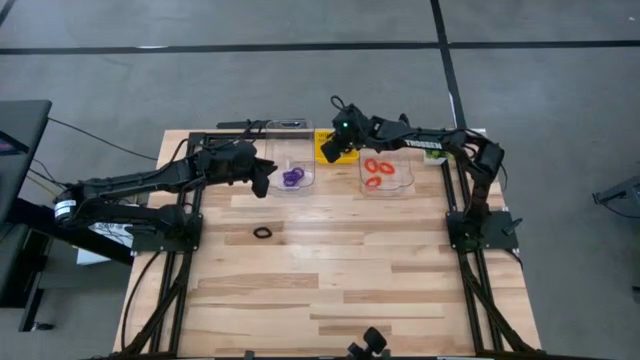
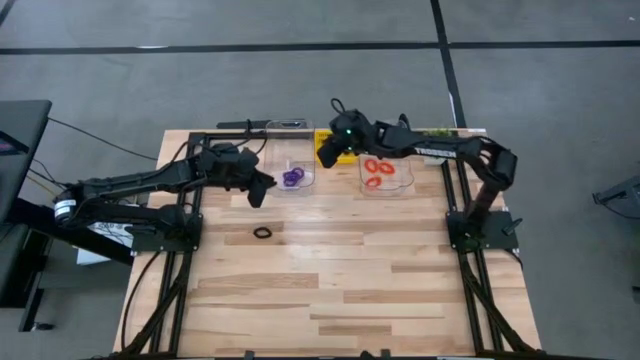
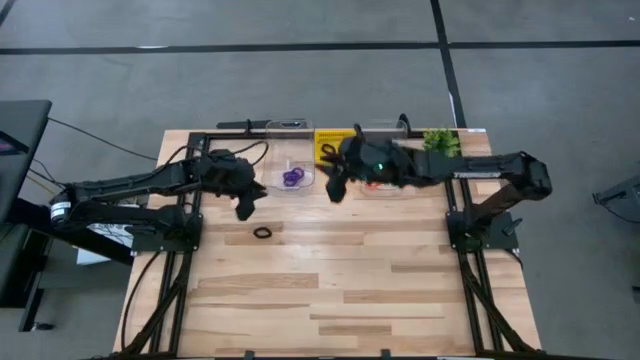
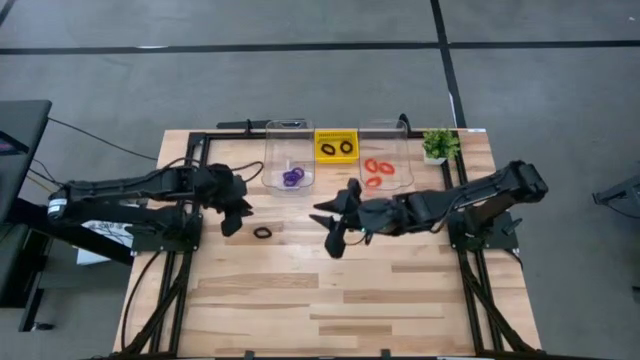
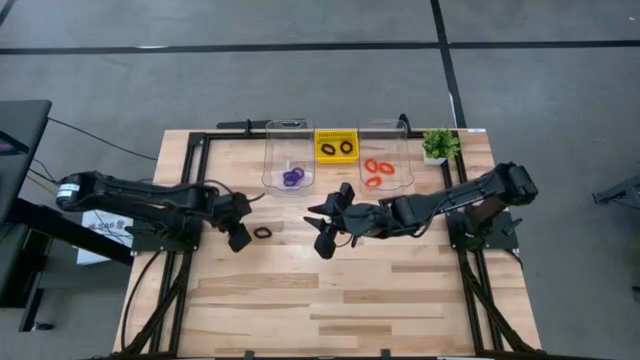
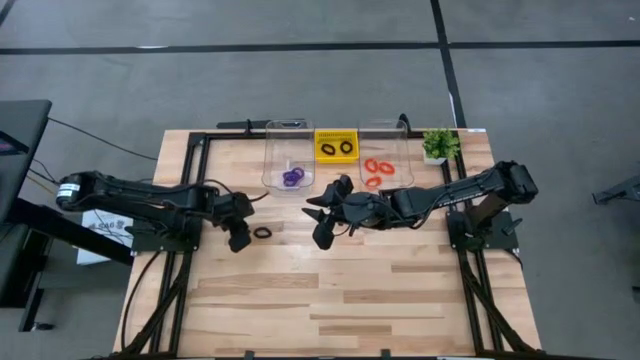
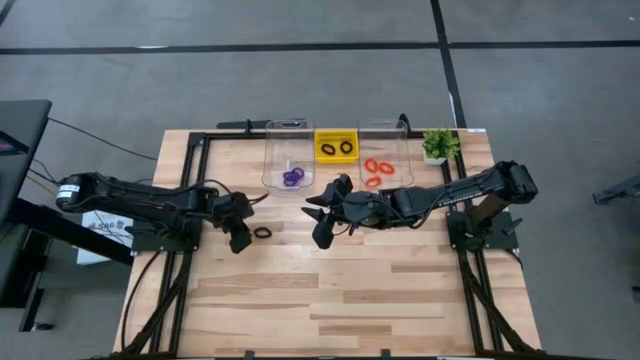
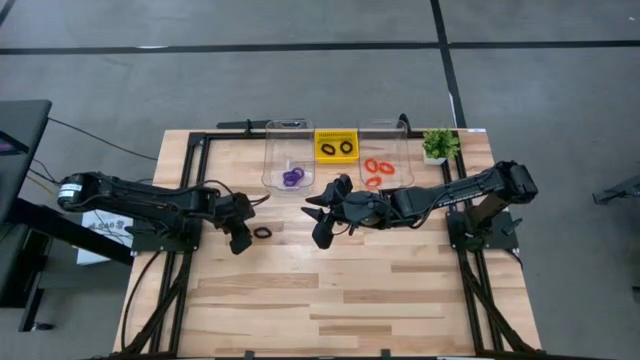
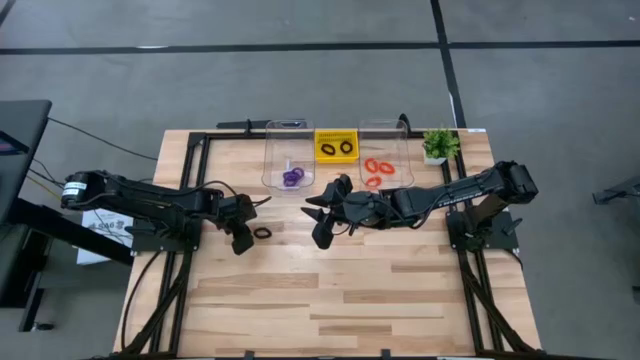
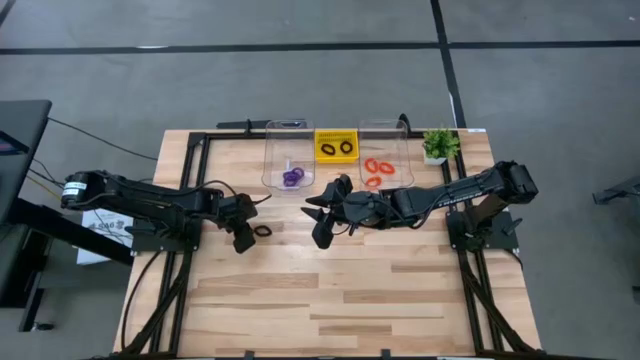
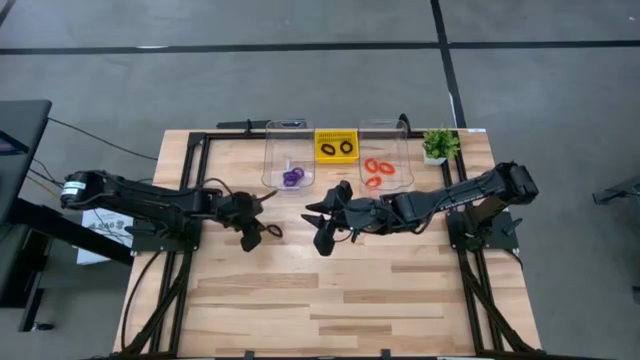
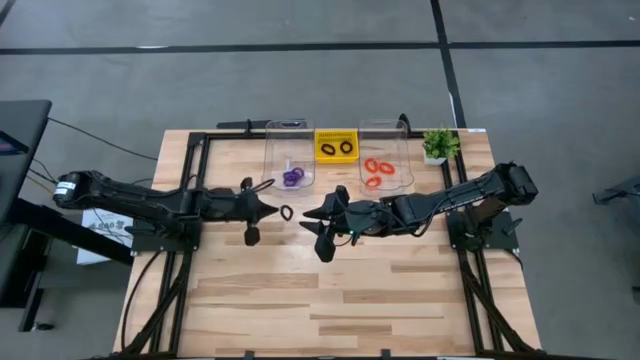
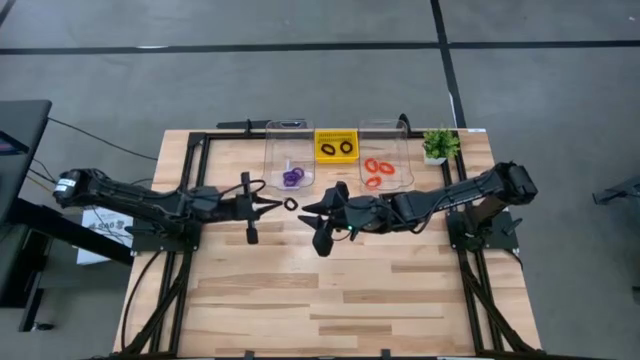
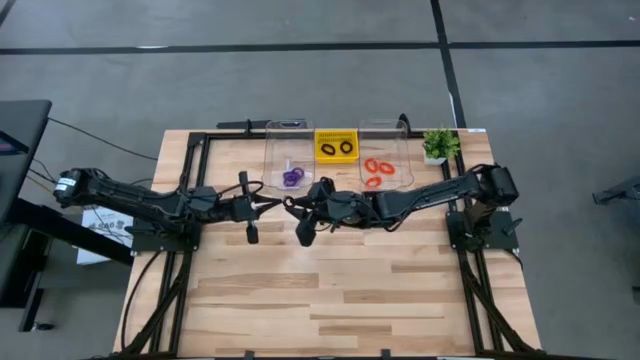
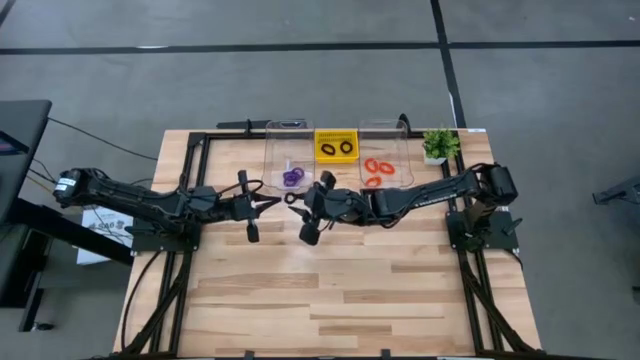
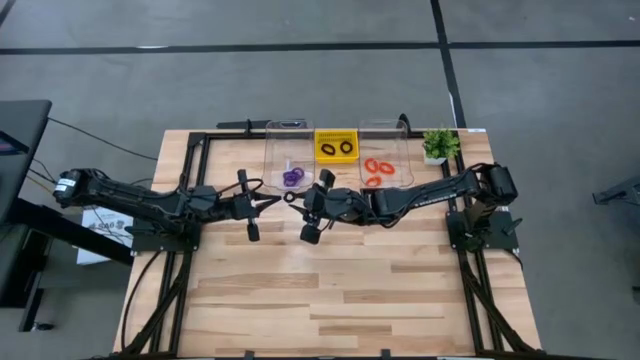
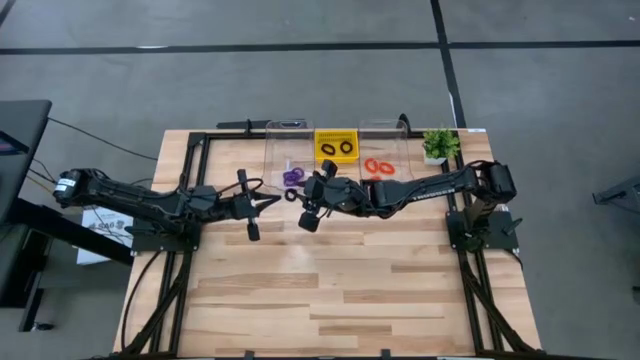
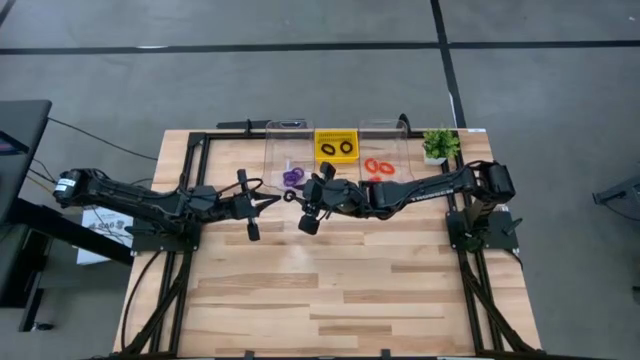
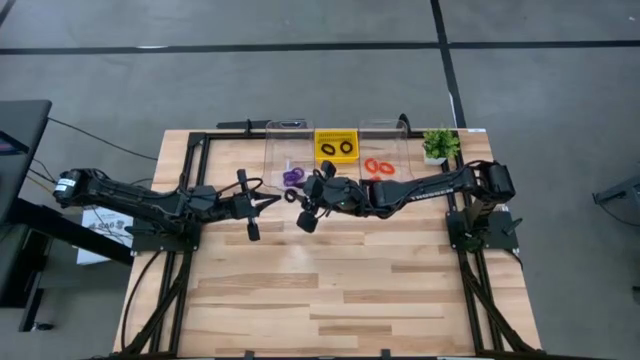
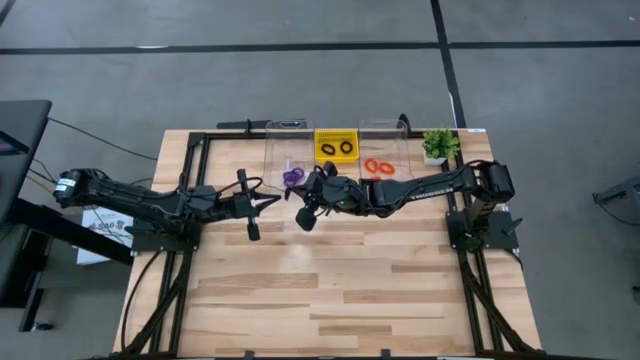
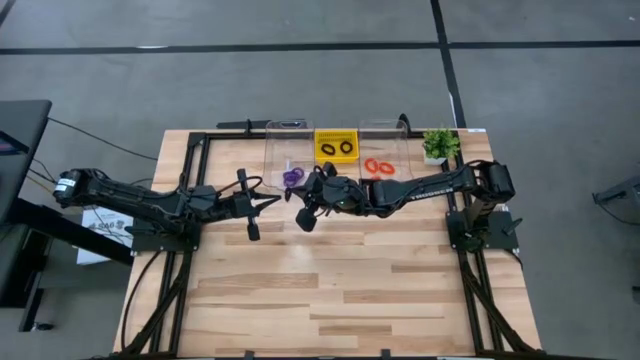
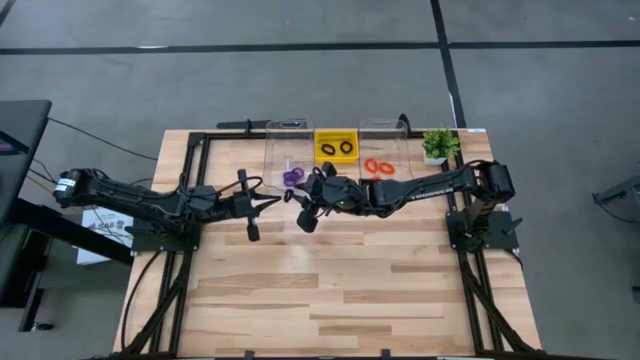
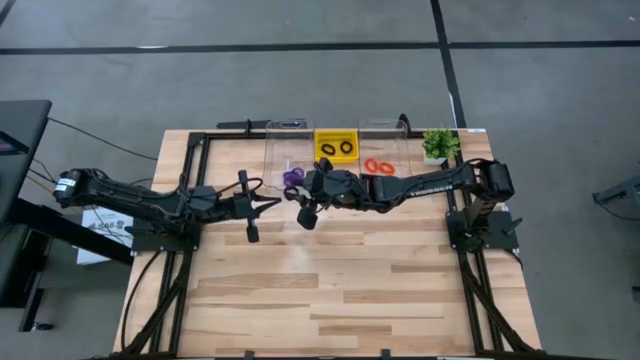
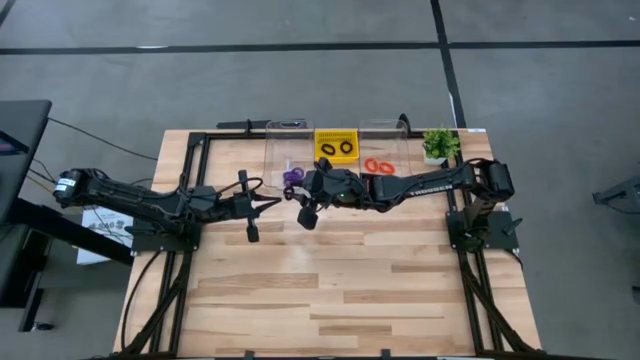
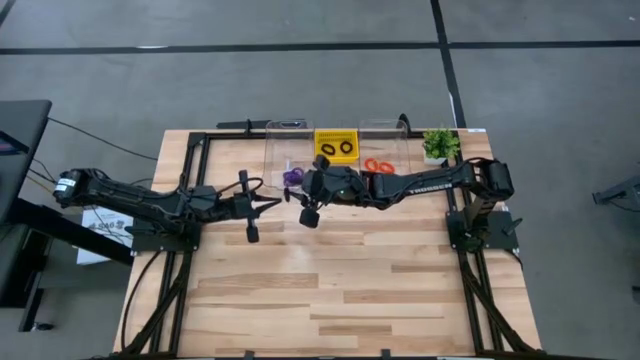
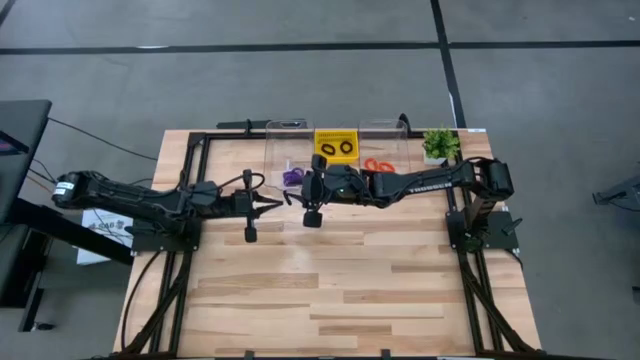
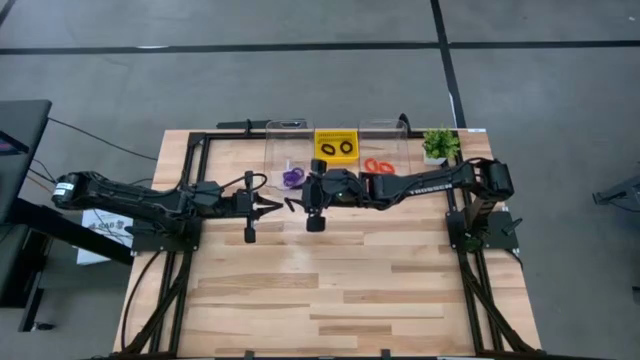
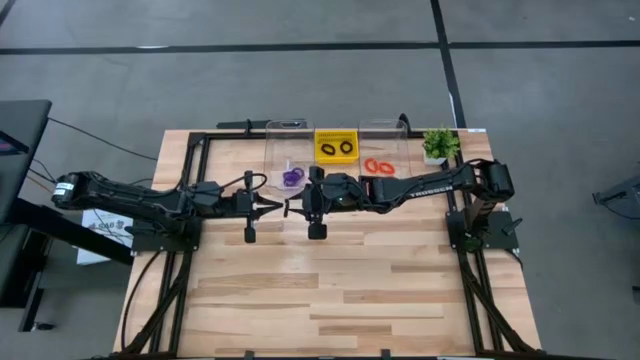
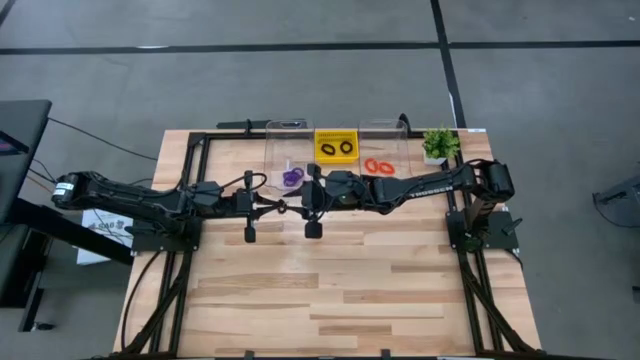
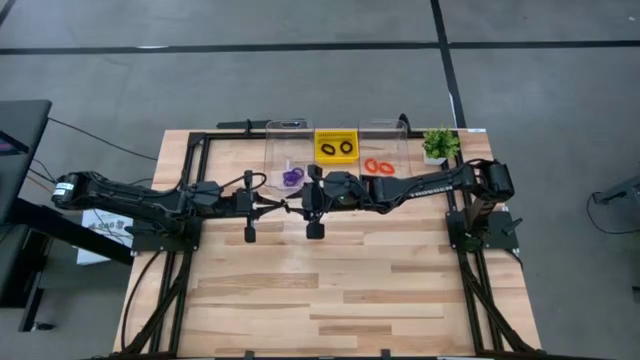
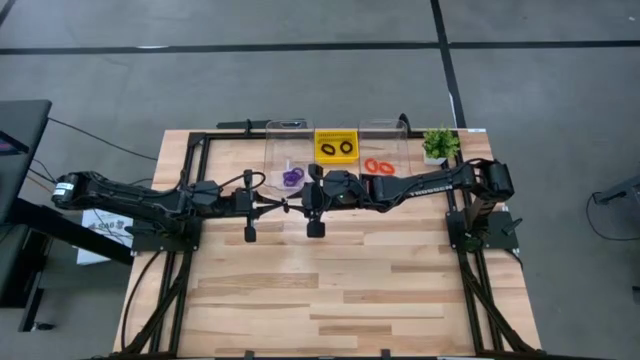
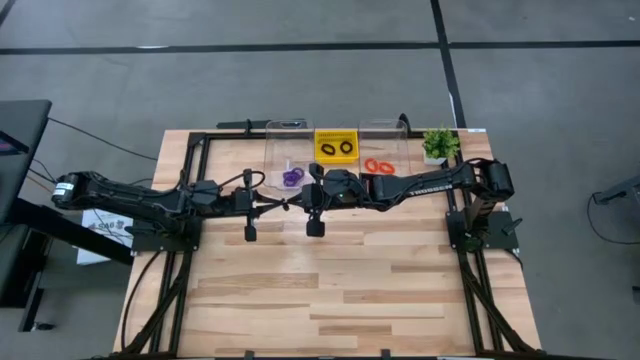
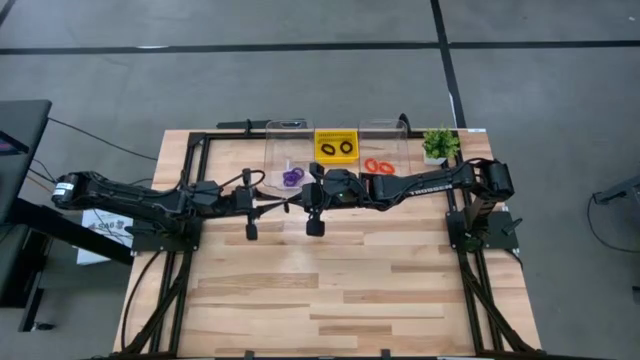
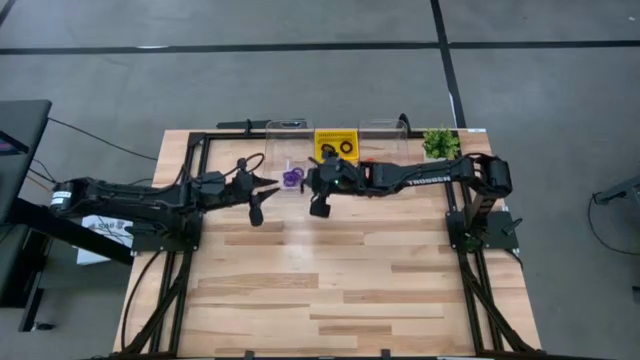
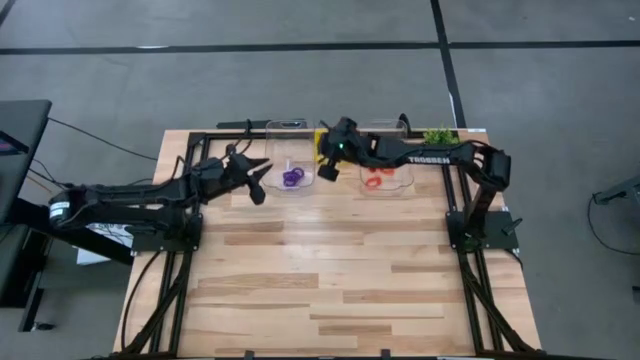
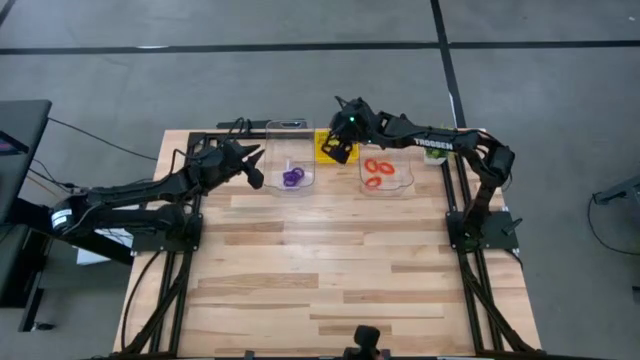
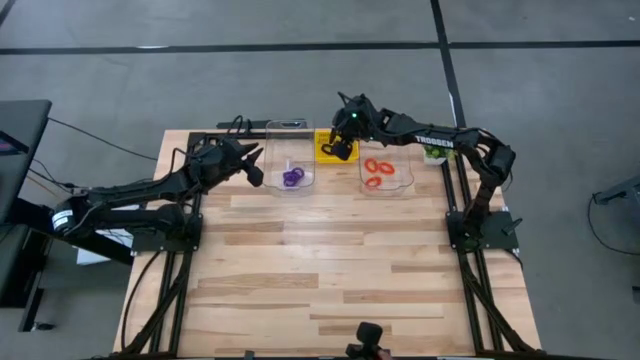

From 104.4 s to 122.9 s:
Task: Sort spring keychains
Put the black spring keychain into the yellow bin

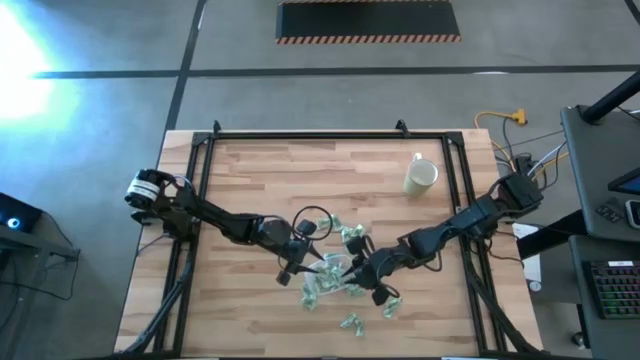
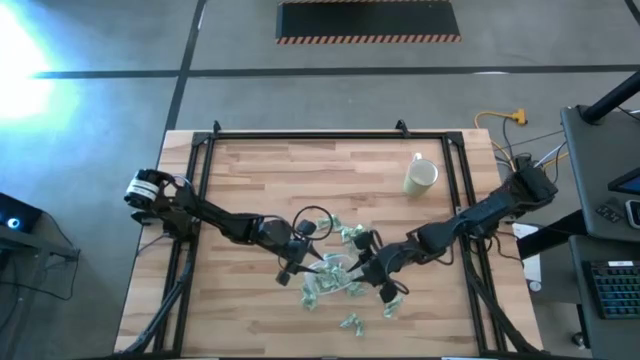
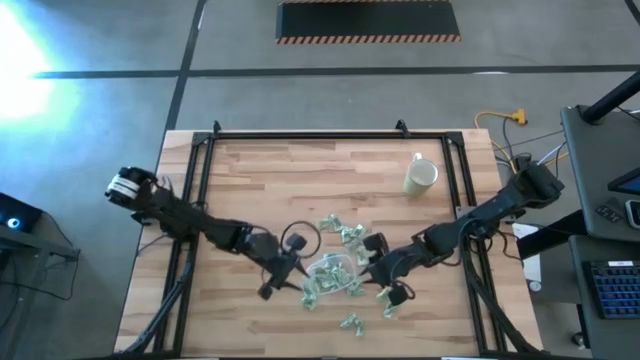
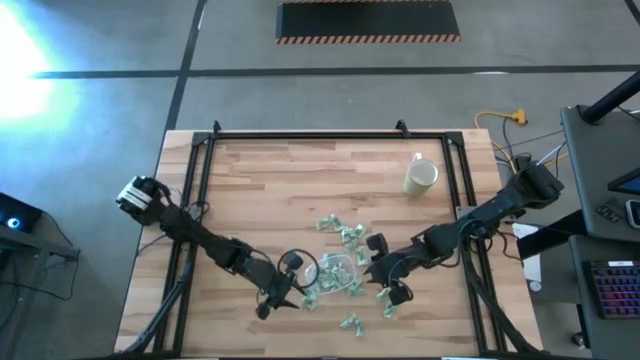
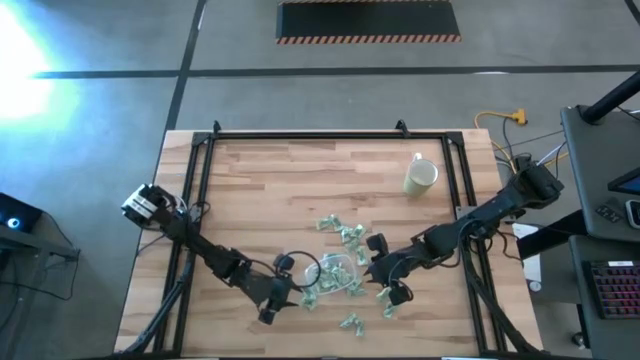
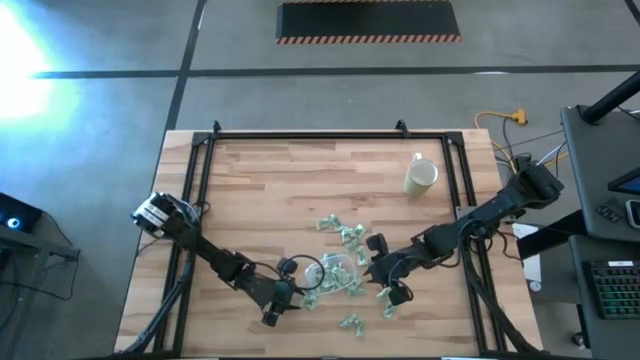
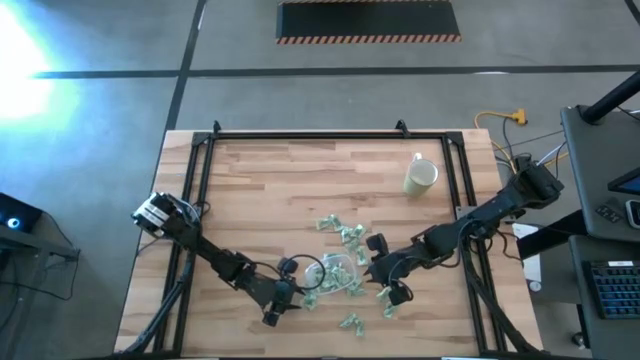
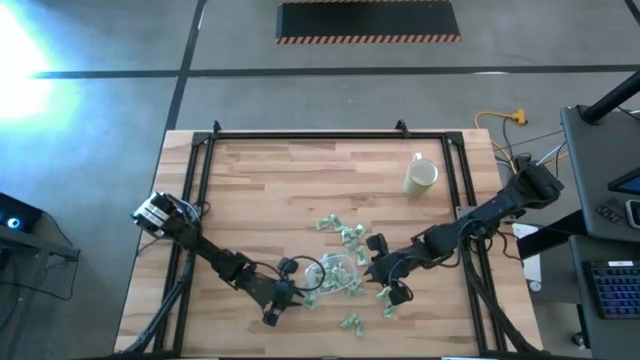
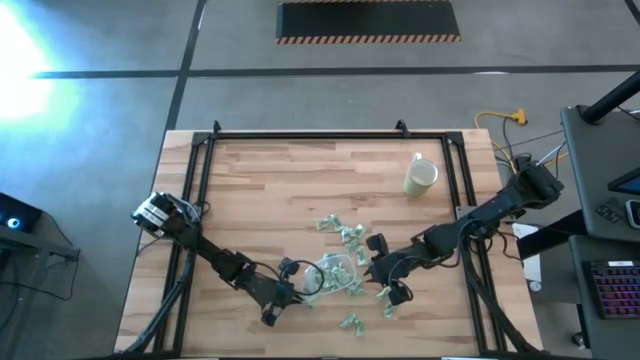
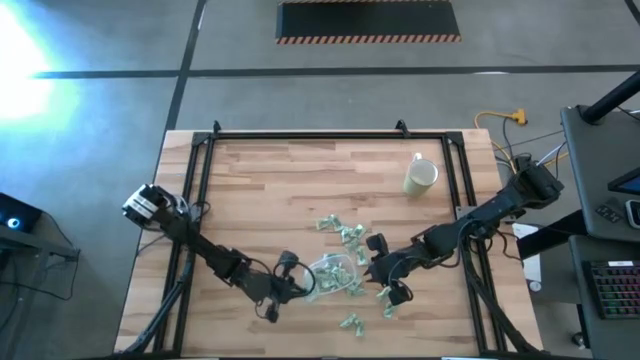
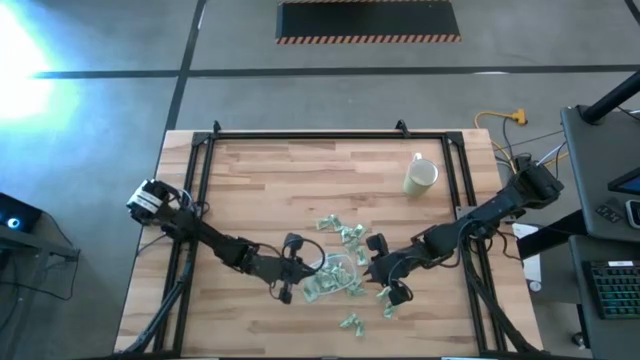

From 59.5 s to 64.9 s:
Task: Pick and place items into bin
Put the Stevia packet into the transparent bin
